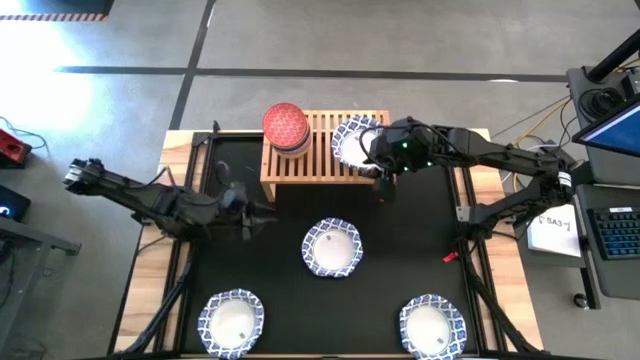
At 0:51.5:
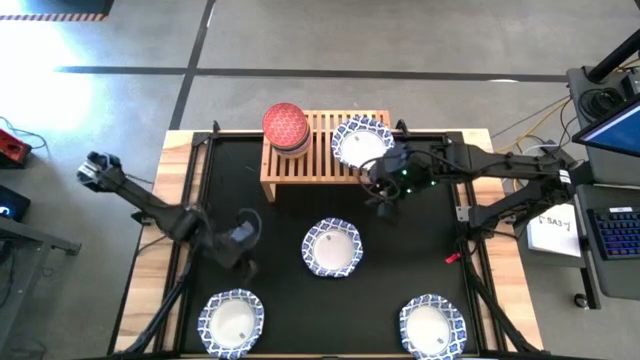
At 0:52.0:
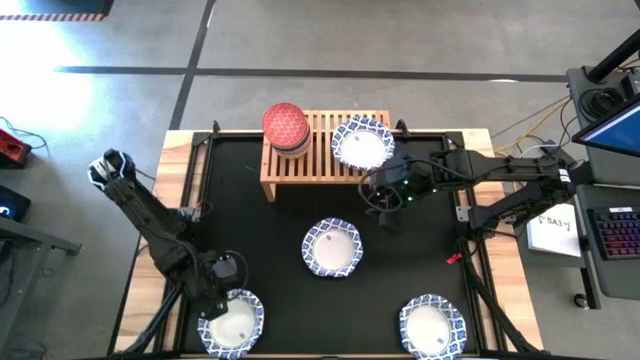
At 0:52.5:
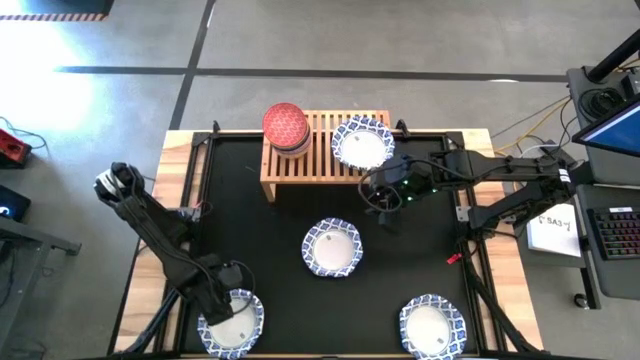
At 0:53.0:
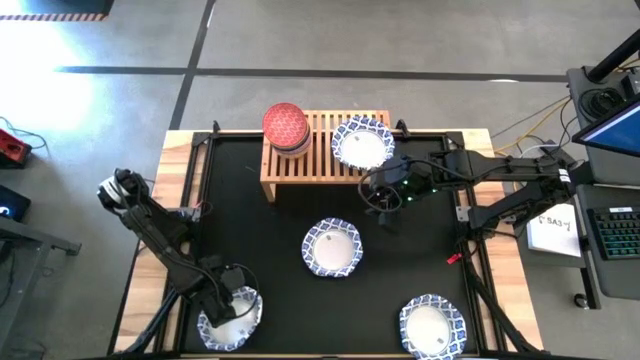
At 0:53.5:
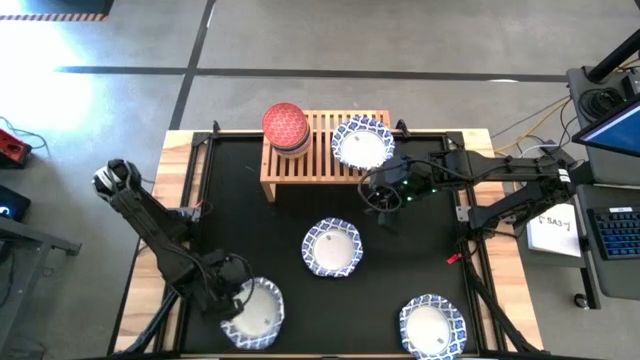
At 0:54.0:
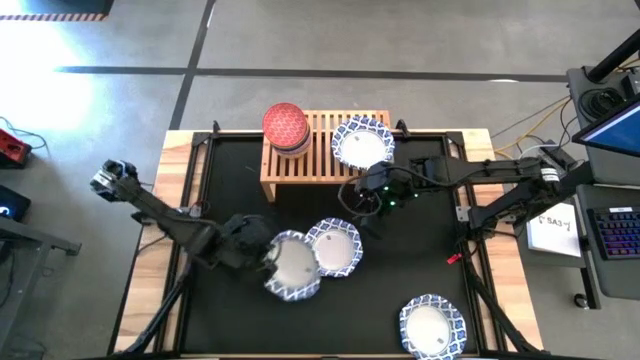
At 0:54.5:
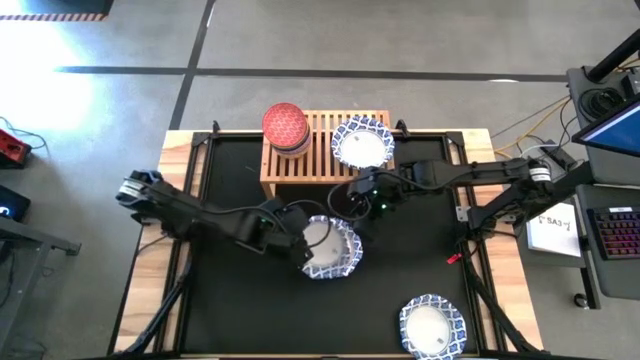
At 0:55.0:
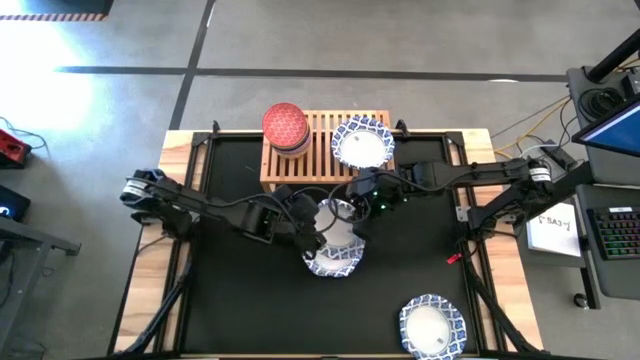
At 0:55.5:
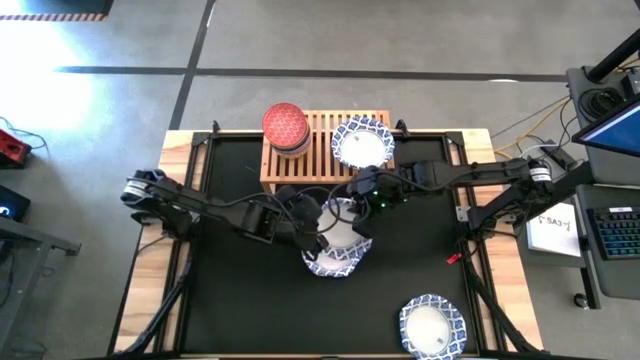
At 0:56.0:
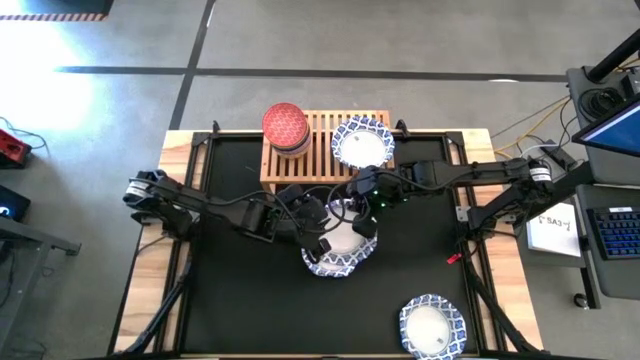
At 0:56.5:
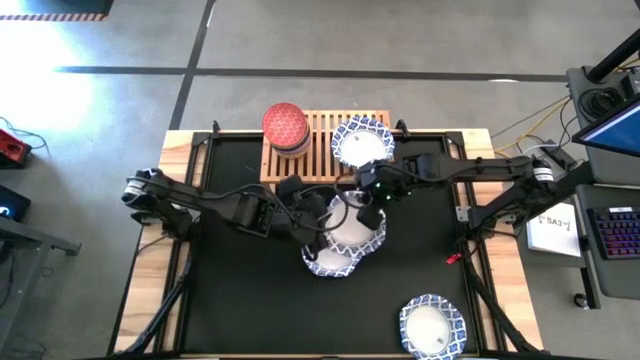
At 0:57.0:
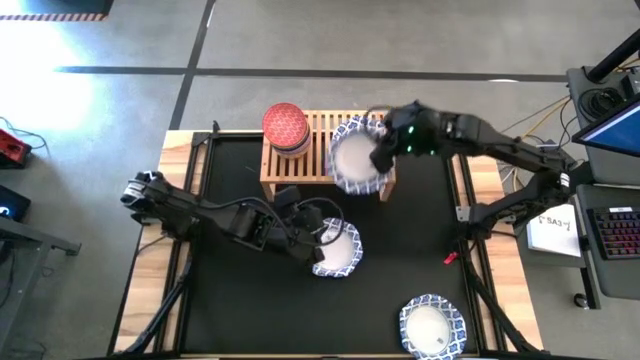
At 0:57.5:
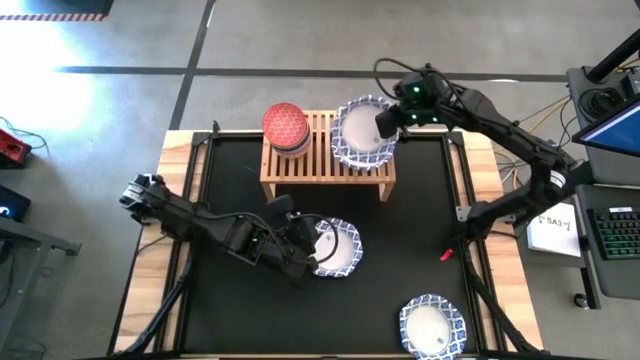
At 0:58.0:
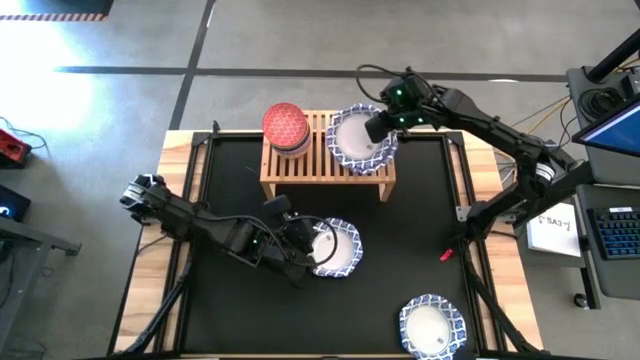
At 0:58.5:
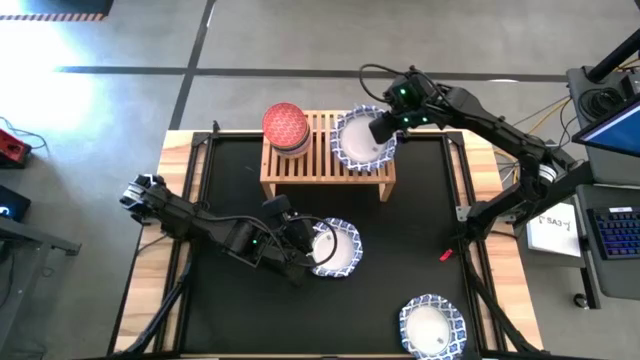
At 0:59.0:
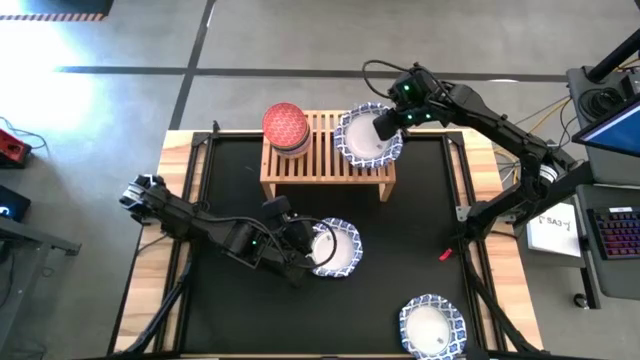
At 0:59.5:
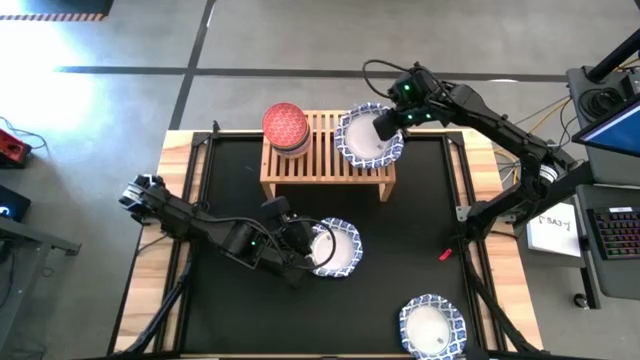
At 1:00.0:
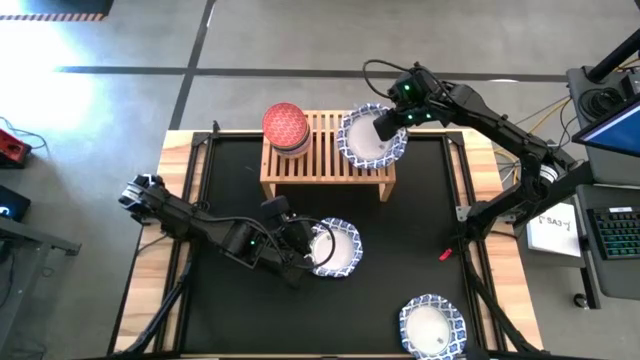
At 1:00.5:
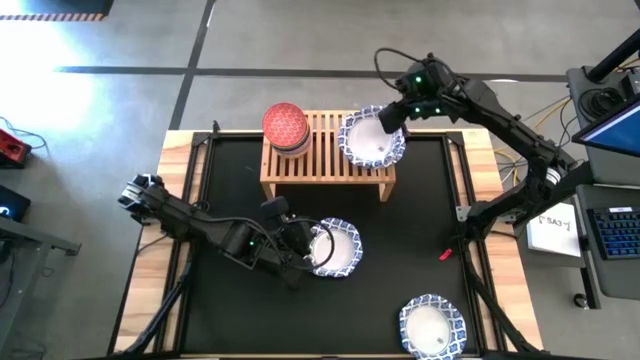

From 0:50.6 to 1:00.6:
Task: Place and stack bowls onto a shelf
Stack the white bowl on top of the white bowl on the shelf

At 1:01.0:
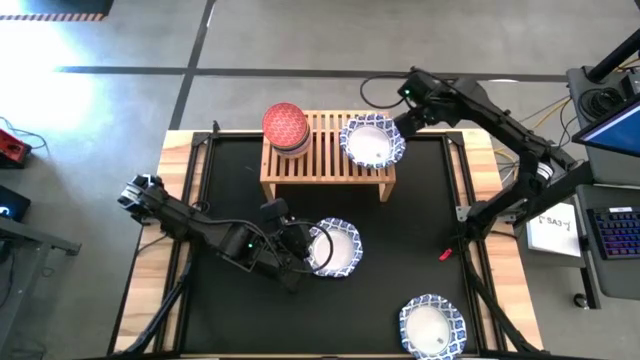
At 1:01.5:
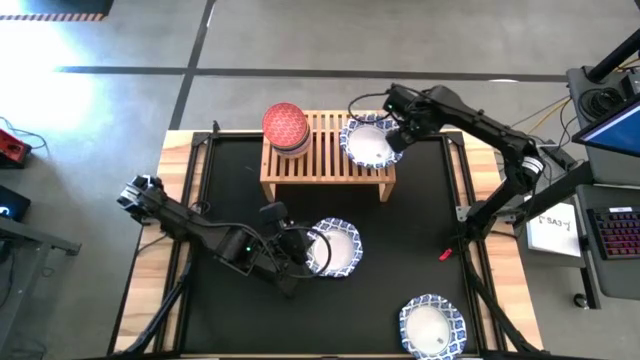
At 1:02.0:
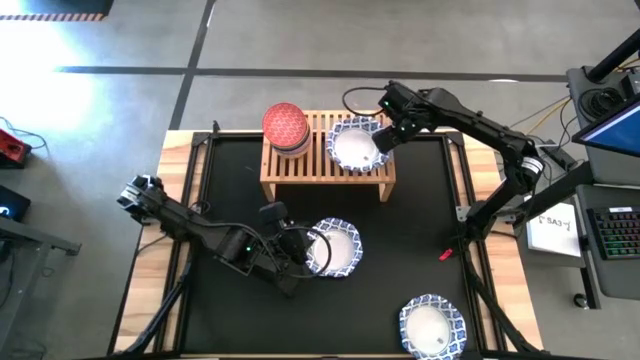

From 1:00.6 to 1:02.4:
Adjust the stacked white bowls on the shelf

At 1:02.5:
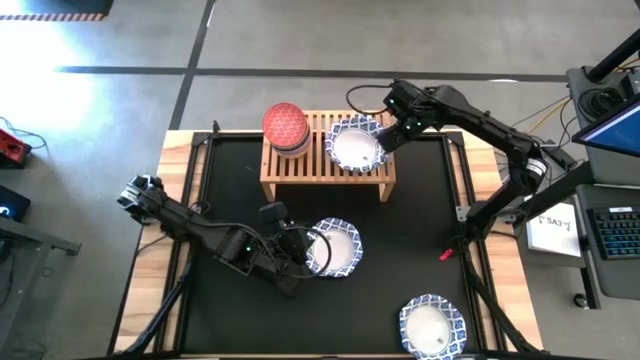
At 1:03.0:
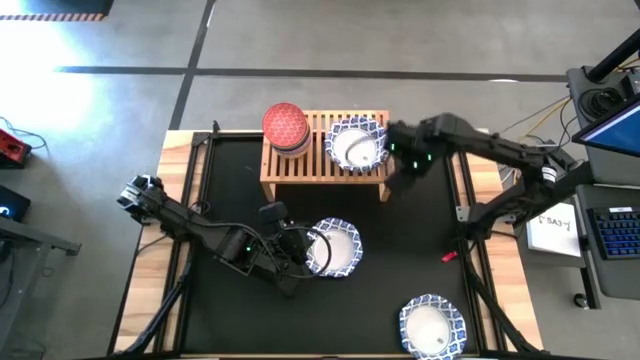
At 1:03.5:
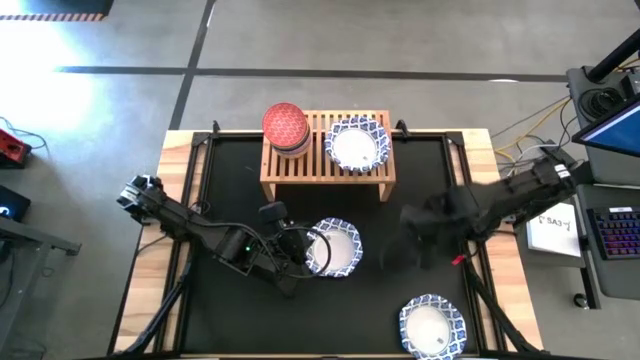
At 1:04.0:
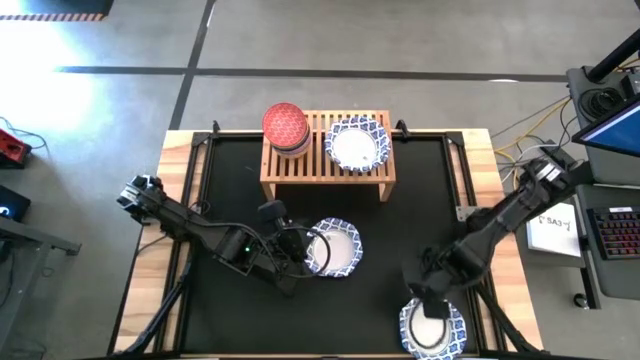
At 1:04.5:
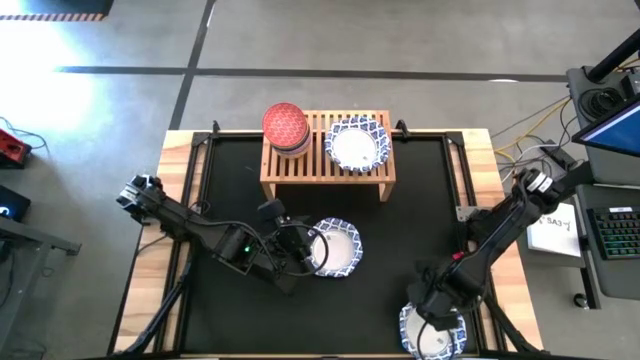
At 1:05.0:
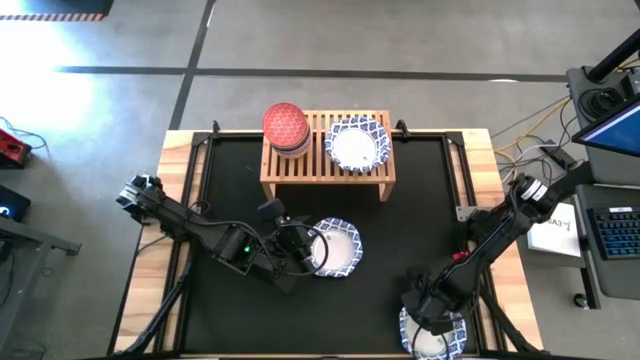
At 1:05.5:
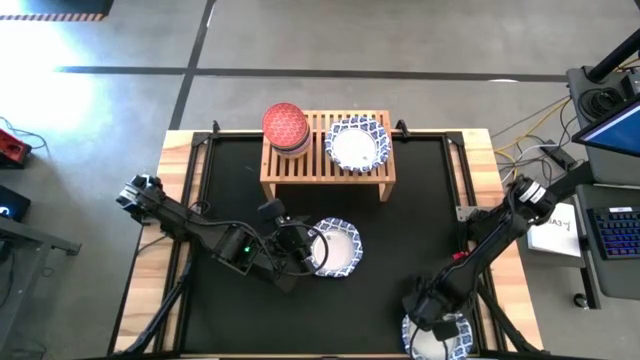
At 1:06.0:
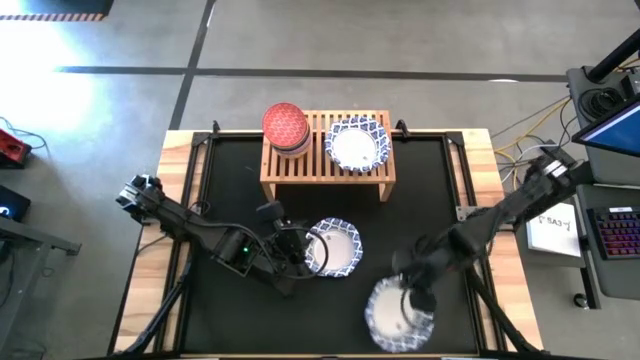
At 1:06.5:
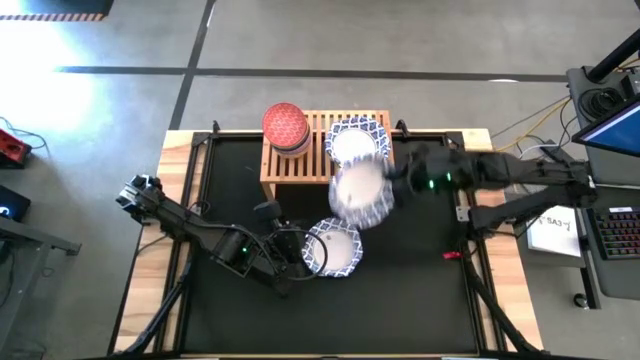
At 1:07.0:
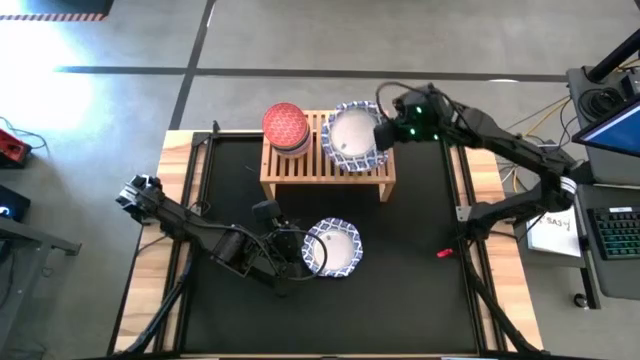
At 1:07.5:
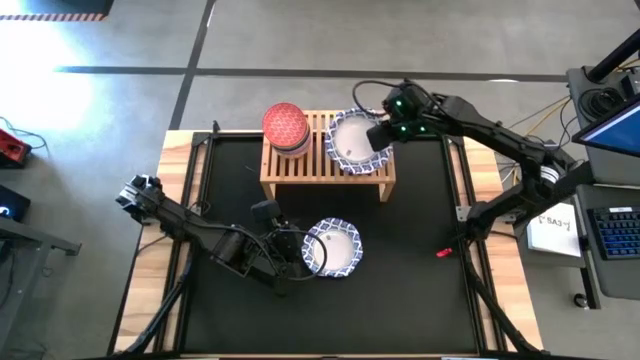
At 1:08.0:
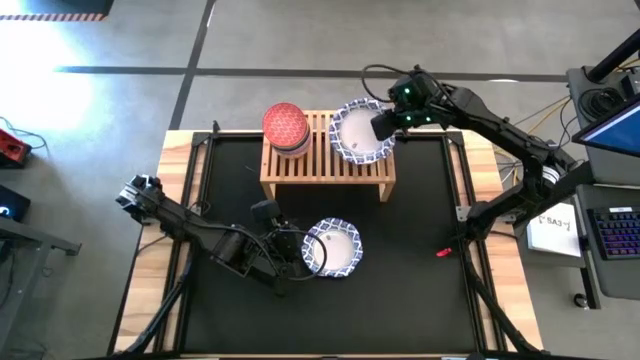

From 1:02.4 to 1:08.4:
Stack the white bowl on top of the white bowl on the shelf
